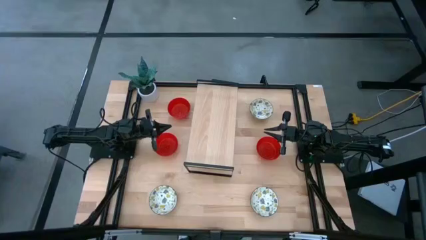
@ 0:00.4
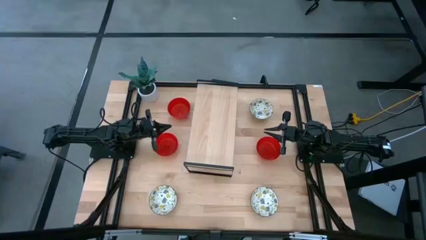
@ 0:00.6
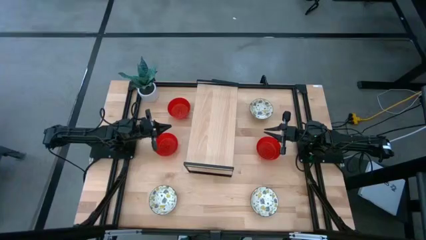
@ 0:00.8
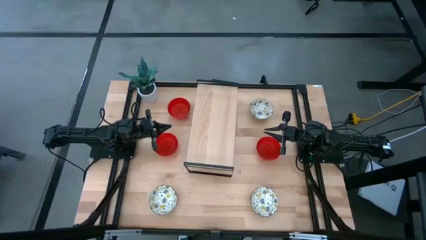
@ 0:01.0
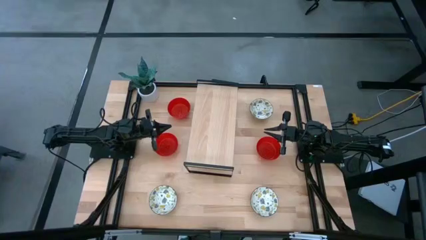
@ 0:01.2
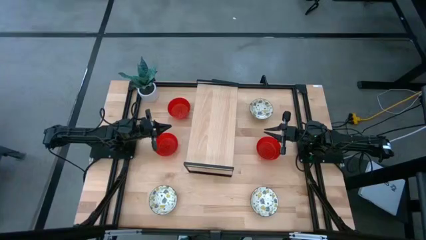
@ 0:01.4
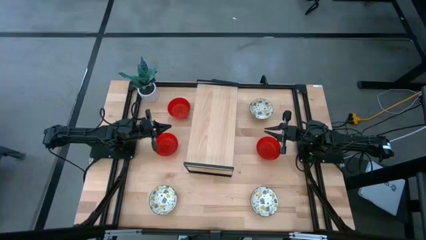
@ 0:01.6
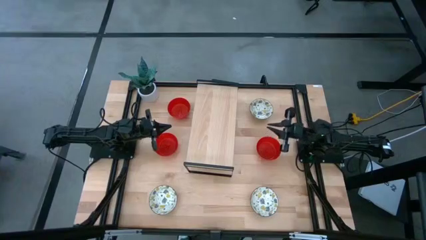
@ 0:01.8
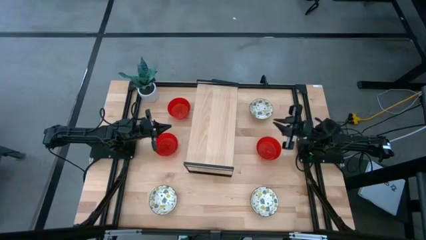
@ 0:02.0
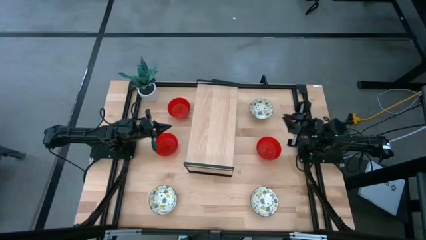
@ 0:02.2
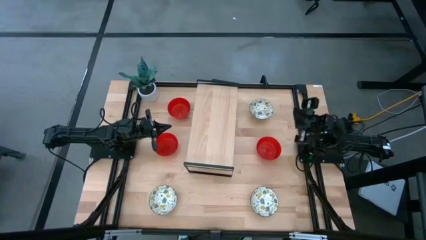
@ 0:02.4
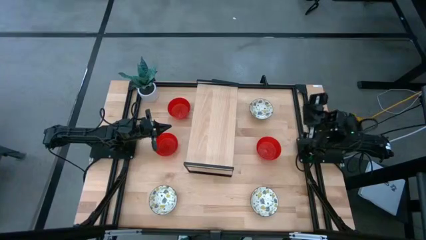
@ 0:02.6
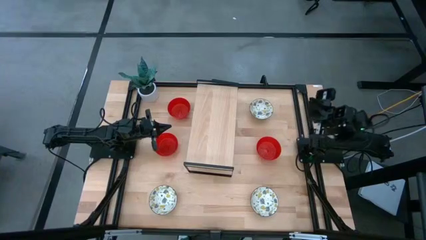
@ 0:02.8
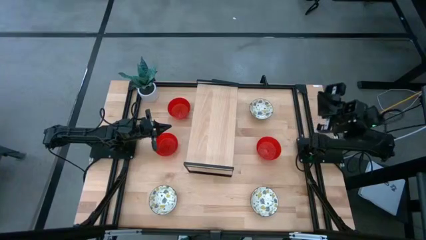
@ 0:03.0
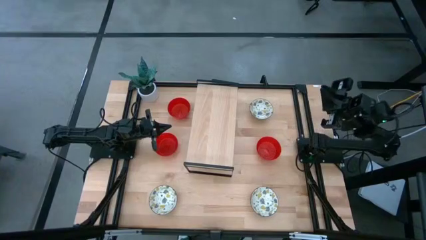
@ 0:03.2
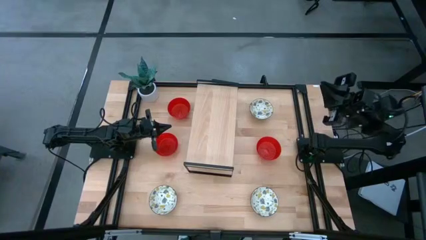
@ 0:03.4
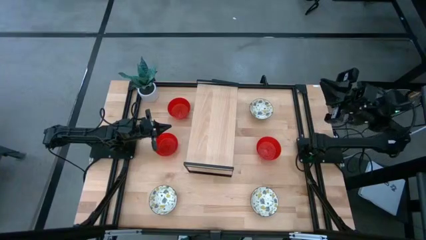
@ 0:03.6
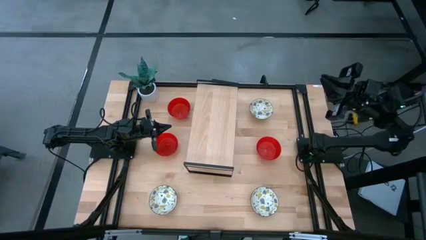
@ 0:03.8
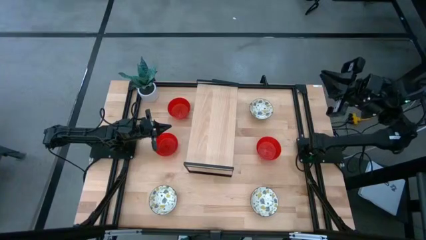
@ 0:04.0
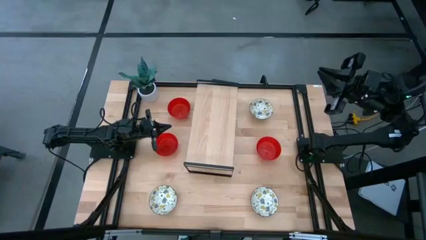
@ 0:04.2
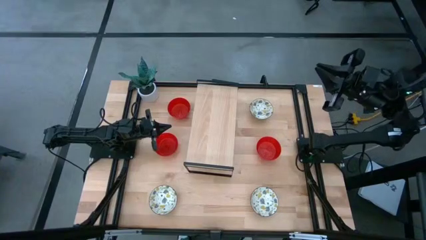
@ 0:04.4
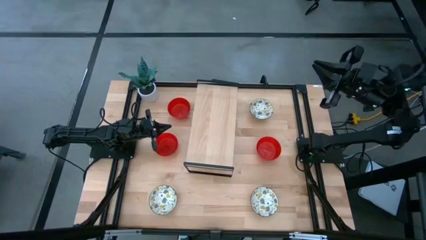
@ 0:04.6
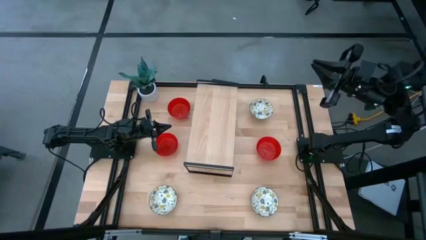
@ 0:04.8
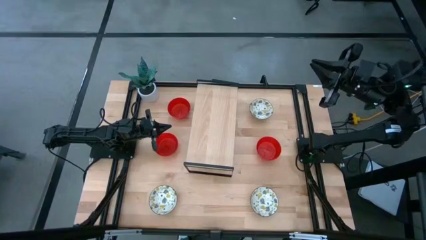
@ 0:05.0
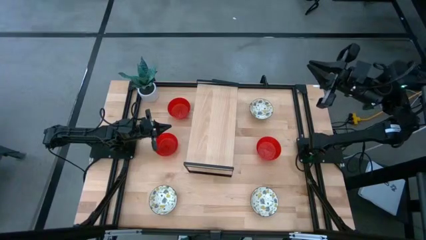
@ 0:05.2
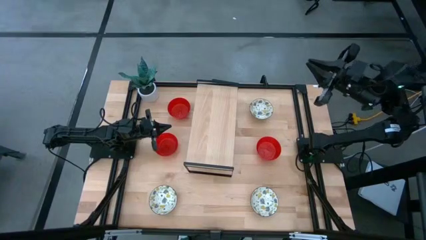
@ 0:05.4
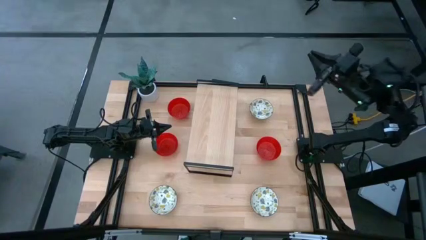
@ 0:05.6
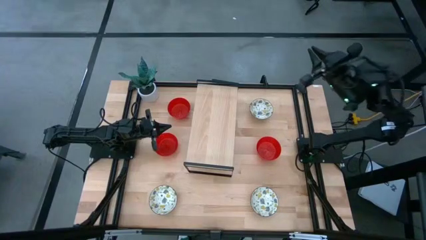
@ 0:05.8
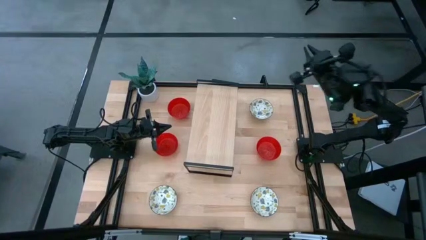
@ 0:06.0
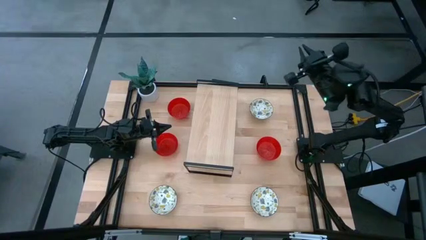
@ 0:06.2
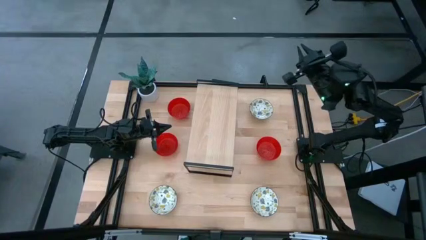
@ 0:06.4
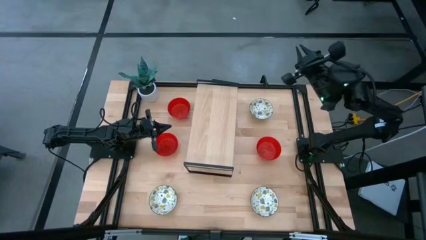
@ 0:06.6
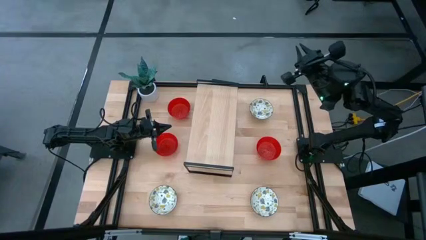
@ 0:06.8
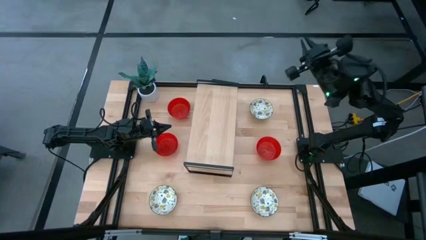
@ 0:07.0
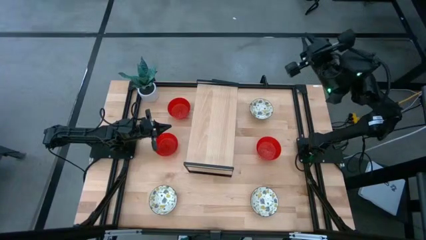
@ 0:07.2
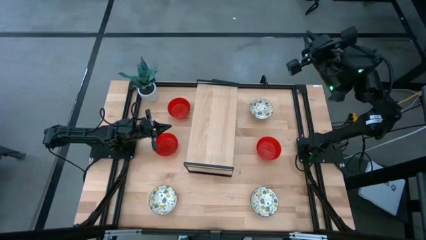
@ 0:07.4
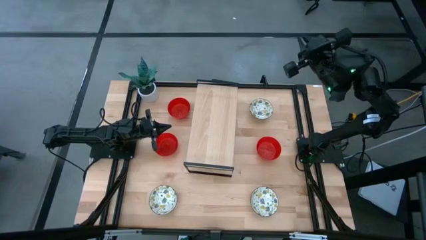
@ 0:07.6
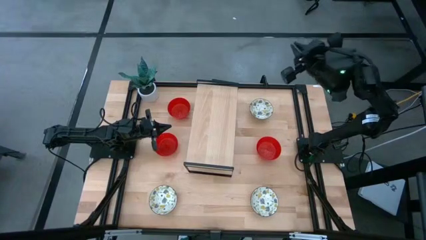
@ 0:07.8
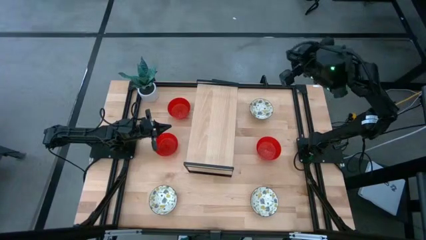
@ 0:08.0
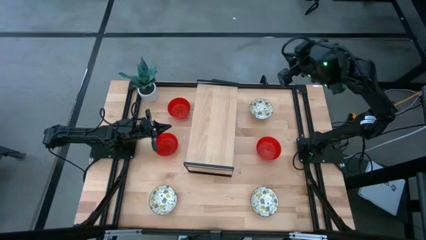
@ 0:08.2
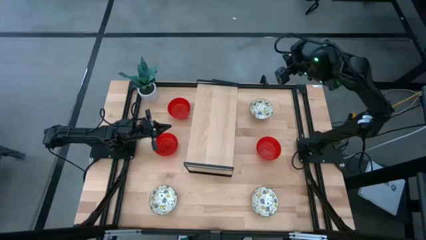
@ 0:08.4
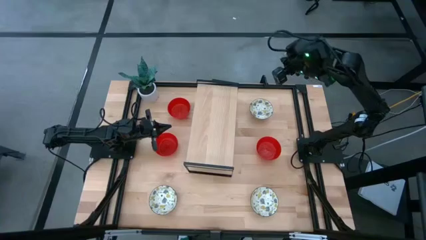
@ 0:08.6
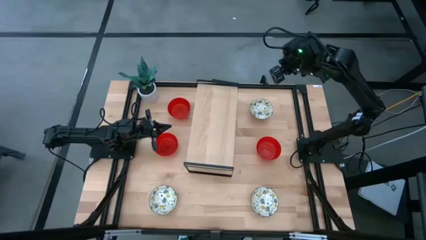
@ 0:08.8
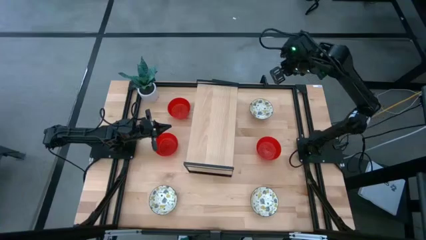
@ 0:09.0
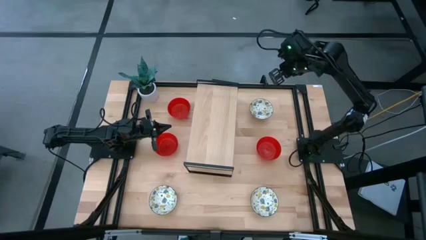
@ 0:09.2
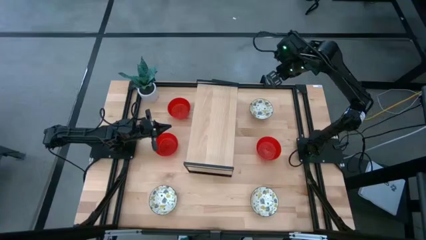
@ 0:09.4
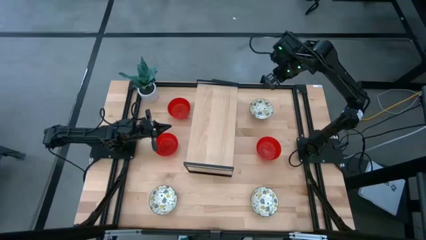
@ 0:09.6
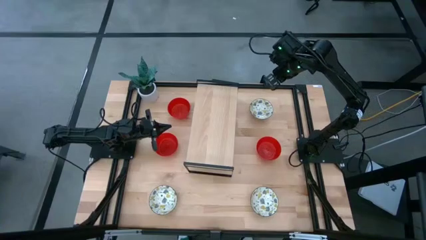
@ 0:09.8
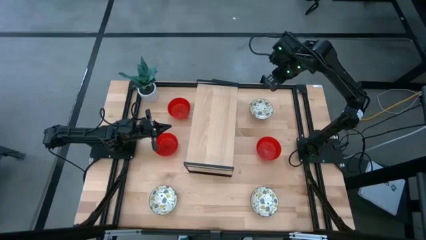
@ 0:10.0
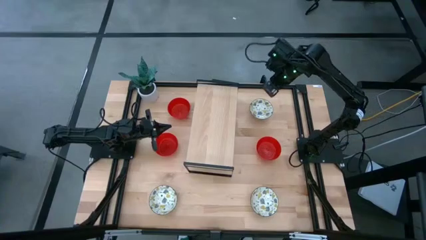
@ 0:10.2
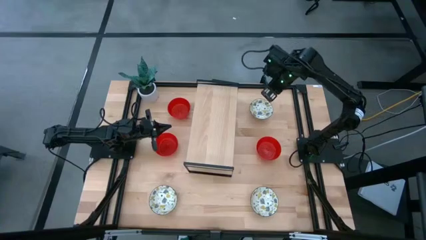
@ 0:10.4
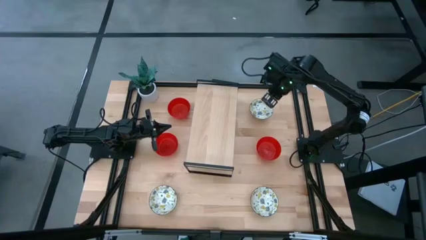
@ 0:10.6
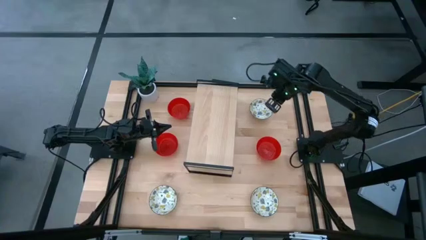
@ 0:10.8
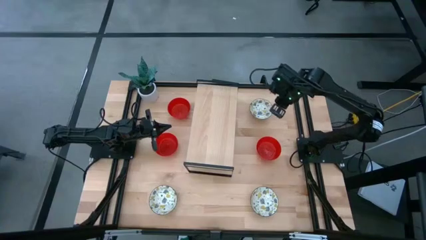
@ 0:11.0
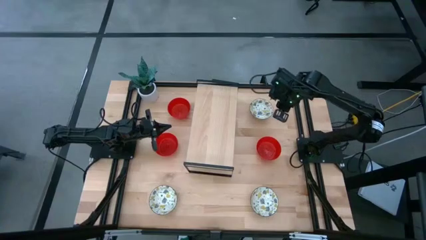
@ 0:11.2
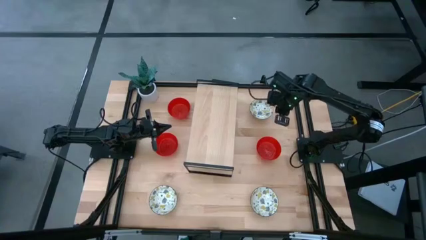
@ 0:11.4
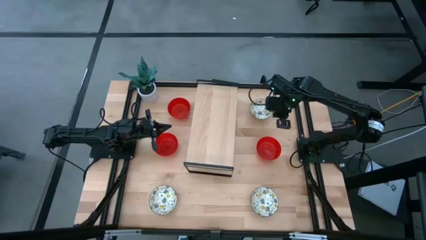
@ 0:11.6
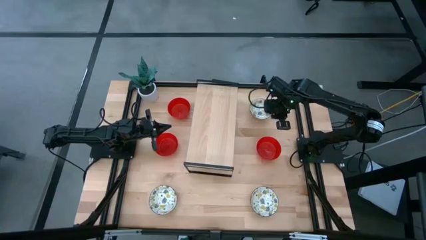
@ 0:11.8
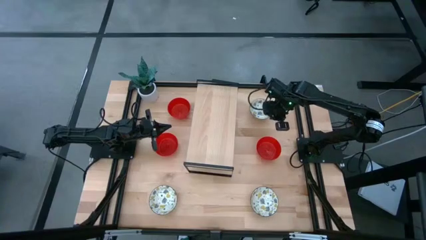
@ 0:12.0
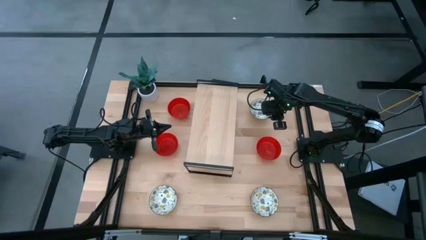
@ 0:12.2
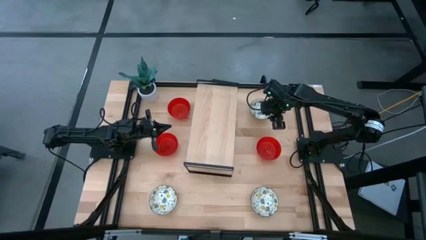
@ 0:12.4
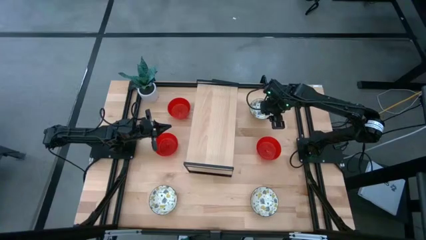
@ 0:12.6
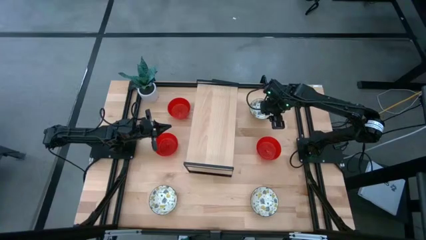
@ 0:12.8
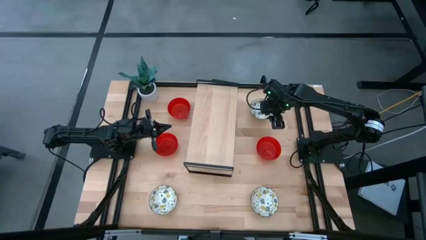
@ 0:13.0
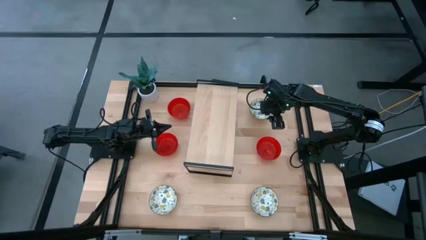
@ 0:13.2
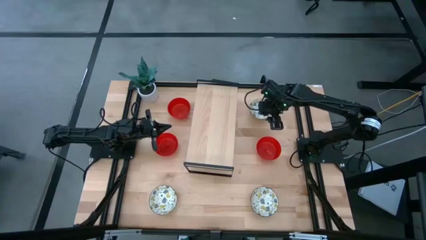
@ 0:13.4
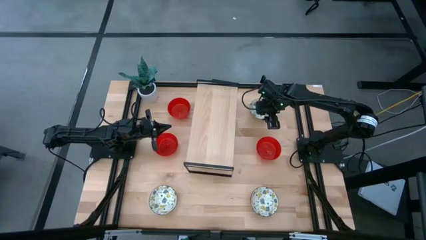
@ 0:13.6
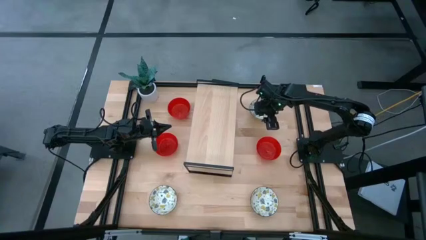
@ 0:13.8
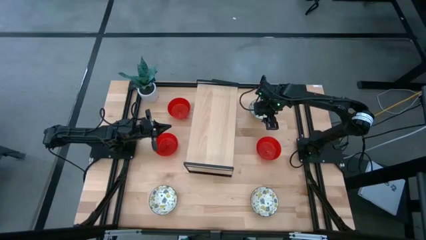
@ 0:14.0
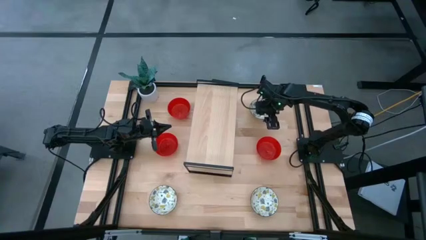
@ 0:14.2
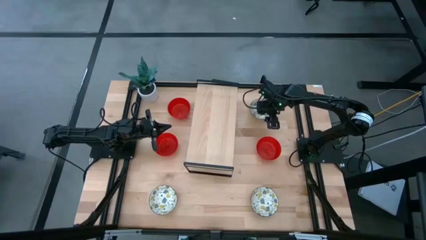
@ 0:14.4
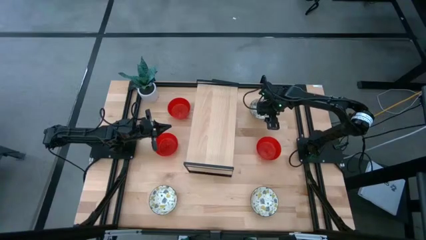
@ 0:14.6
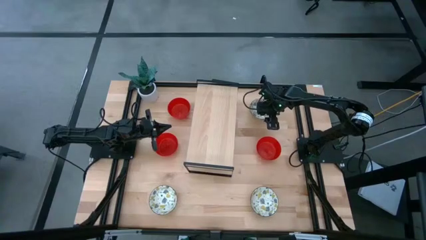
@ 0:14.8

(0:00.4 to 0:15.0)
Task: Pick & Place Mini bowls
Put the top white patterned bowl on the shelf
